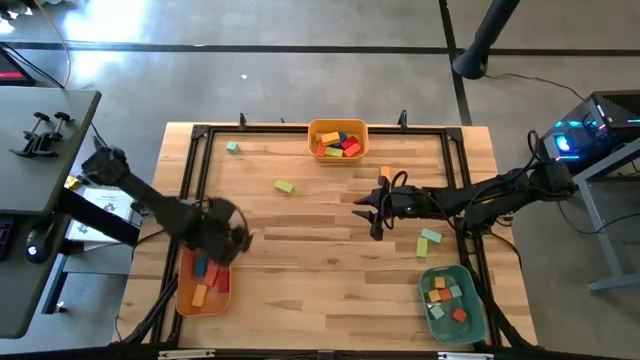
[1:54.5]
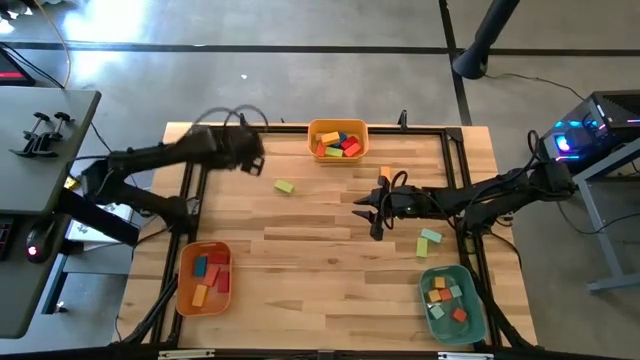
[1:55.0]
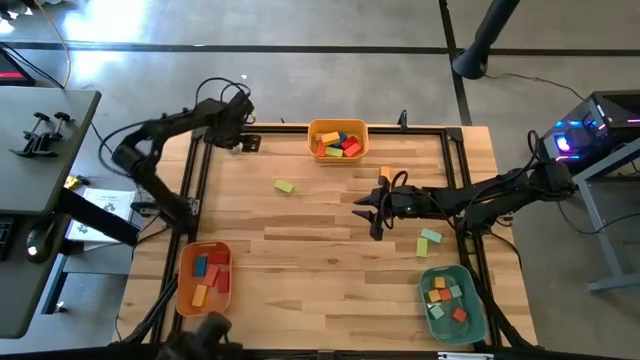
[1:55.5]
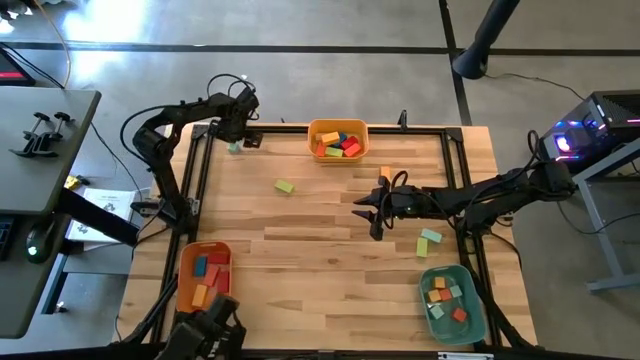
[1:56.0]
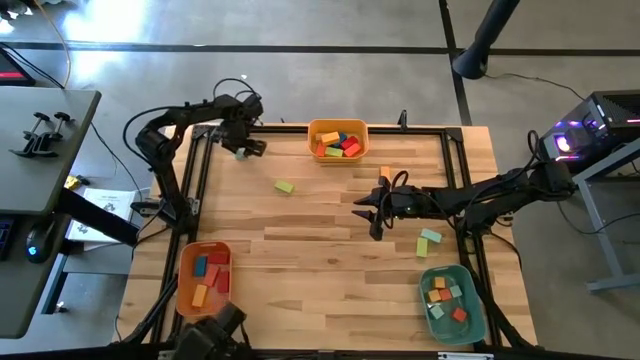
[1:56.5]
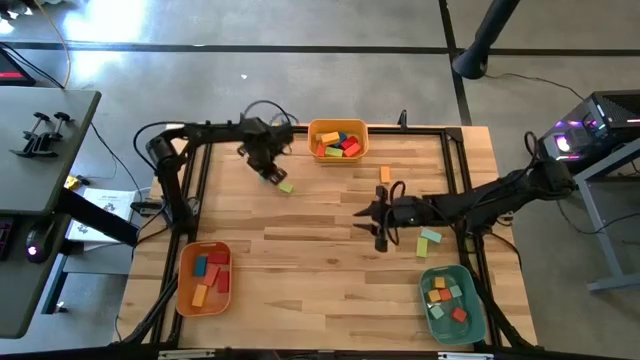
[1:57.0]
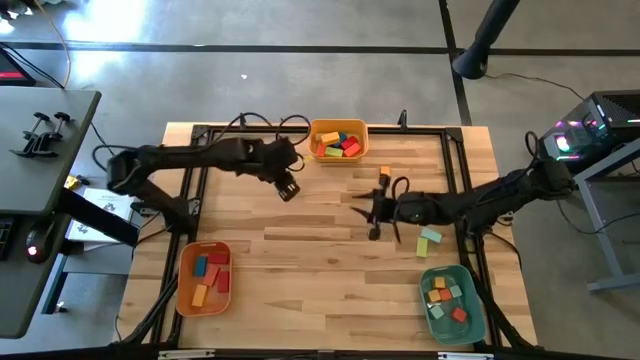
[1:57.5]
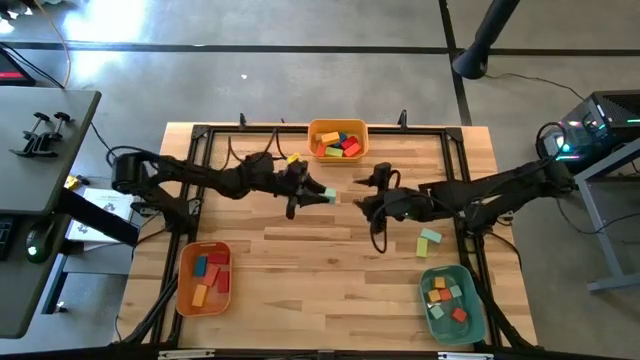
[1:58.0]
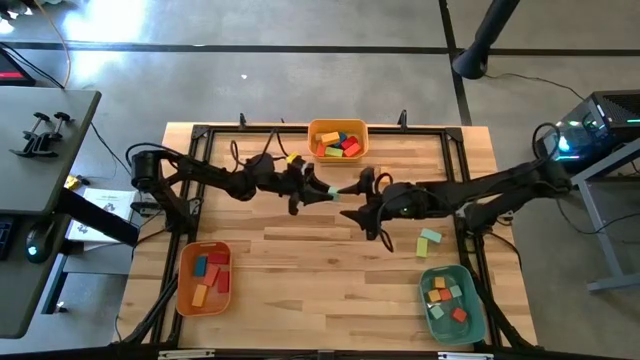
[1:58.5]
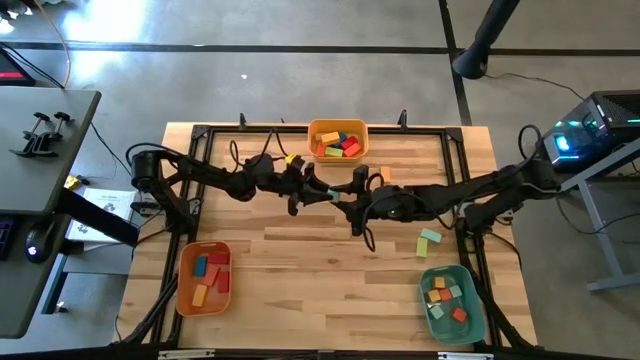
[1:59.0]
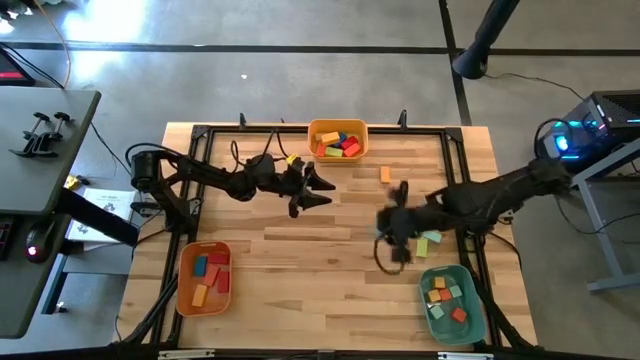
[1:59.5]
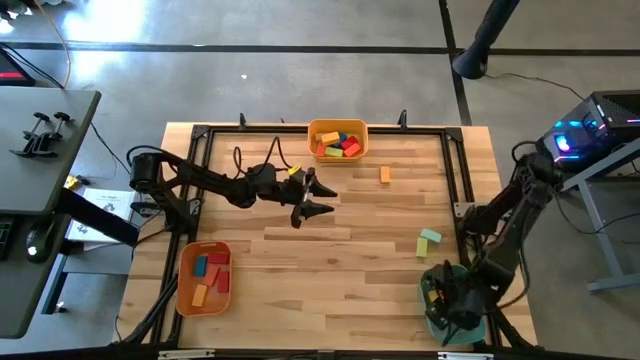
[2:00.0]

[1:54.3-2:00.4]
Task: Sort blocks by size
Put the blue square block into the blue bin

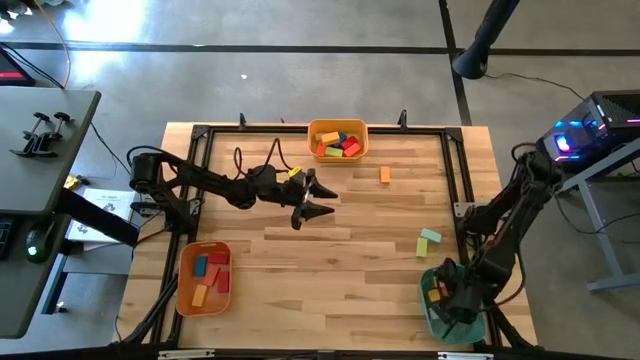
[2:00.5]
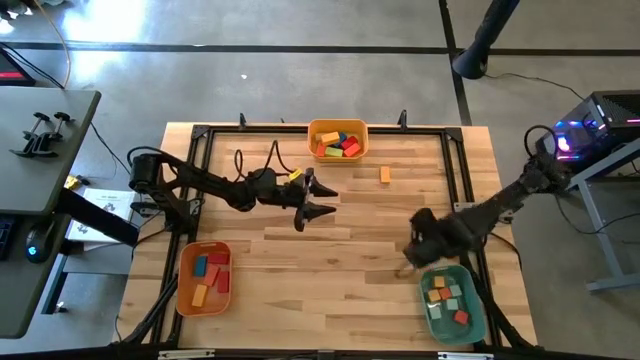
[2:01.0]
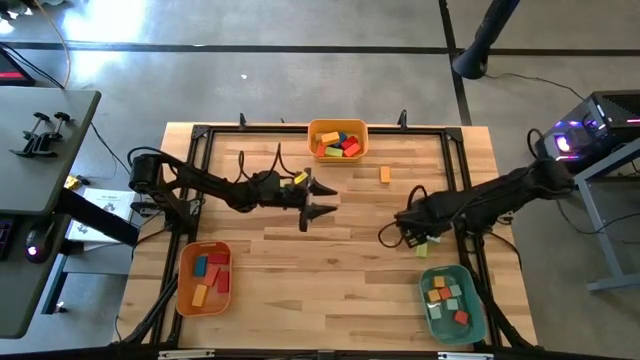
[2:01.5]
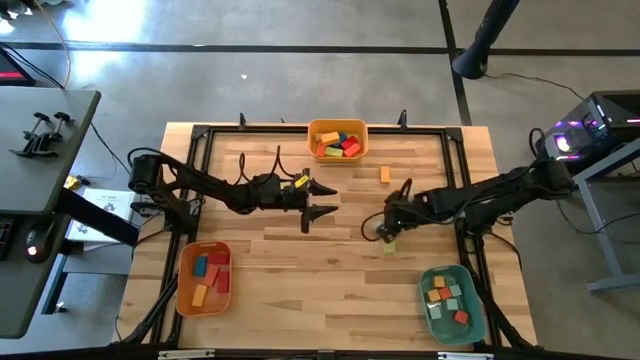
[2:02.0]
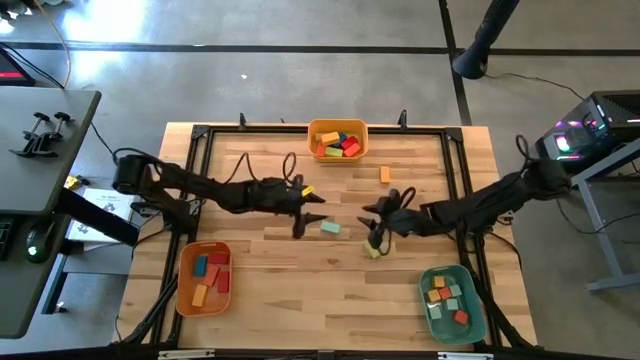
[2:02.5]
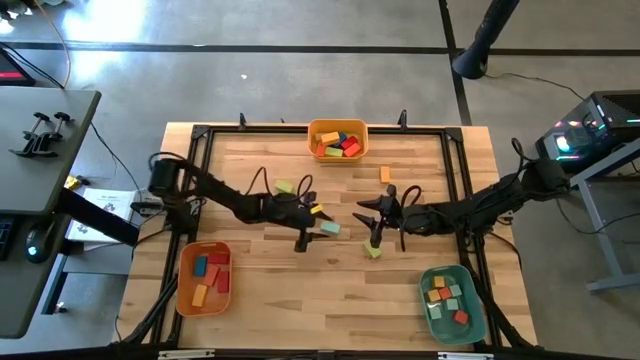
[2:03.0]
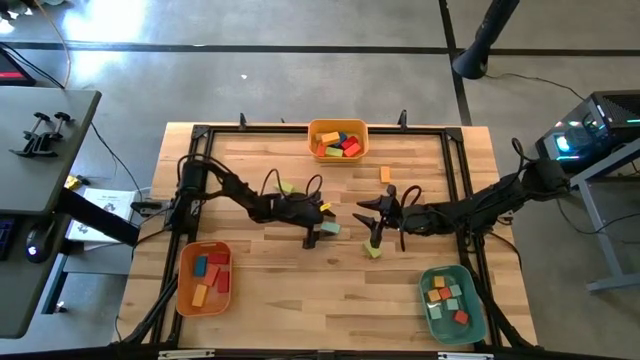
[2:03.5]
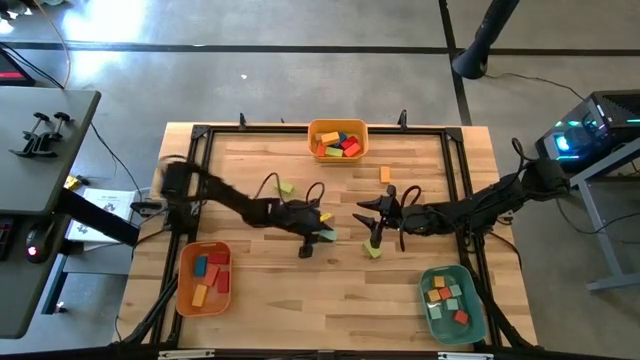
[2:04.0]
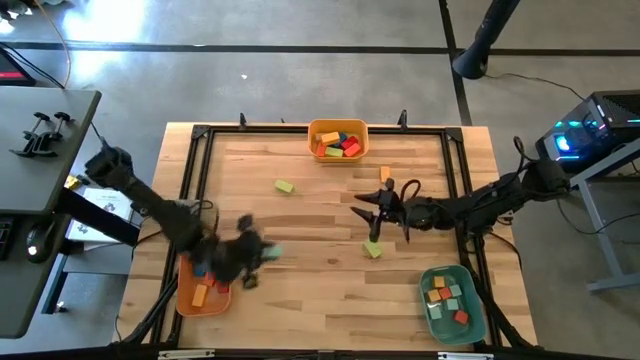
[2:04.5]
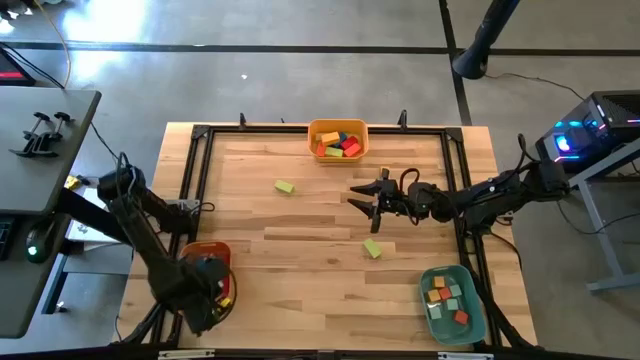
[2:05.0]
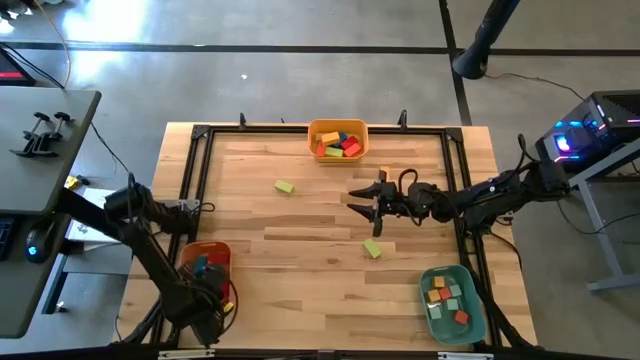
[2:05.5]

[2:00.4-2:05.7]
Put the blue narrow rectangular block into the orange bin

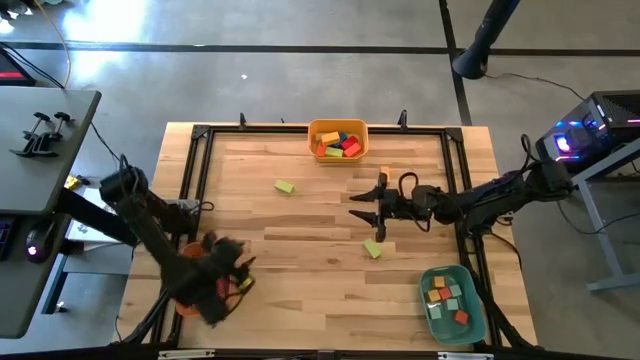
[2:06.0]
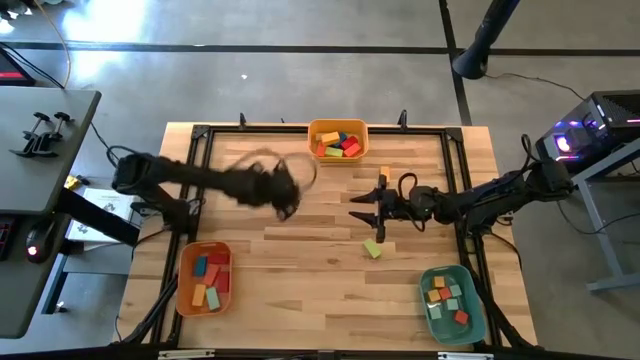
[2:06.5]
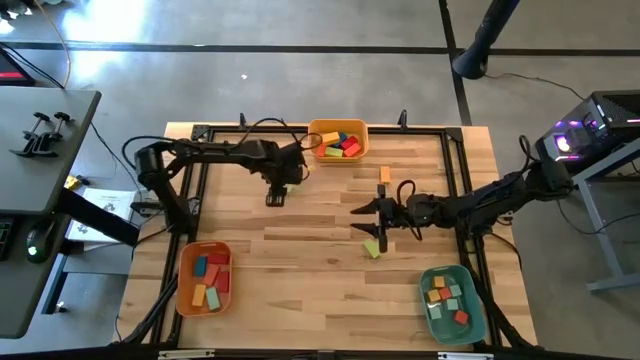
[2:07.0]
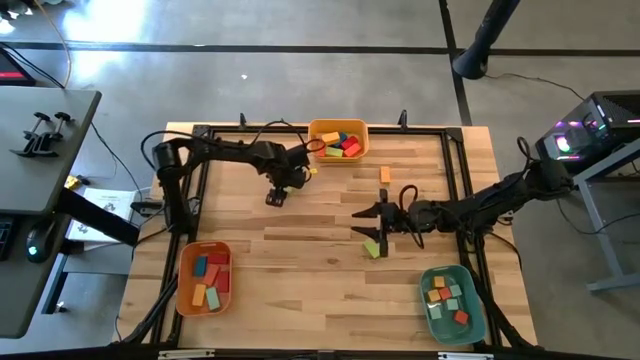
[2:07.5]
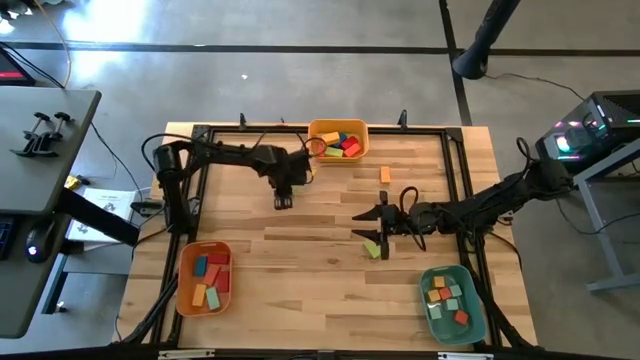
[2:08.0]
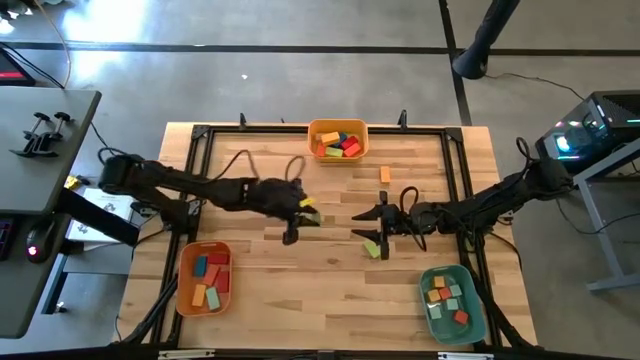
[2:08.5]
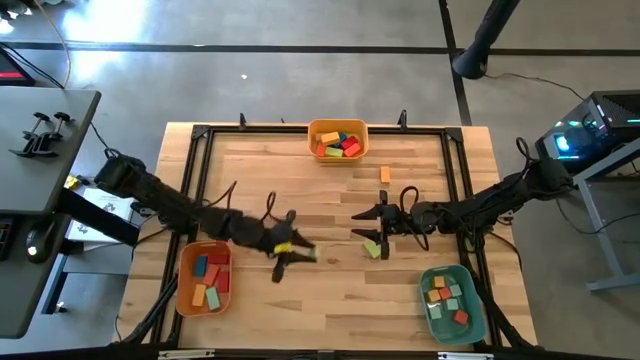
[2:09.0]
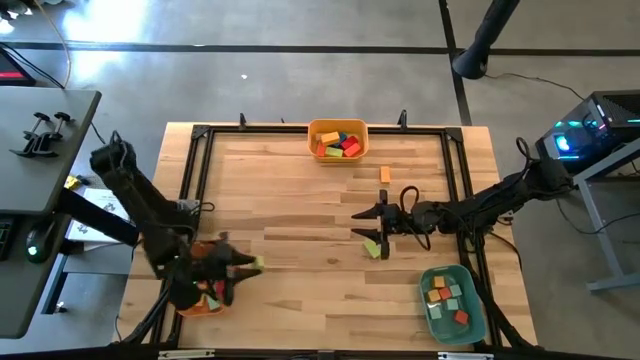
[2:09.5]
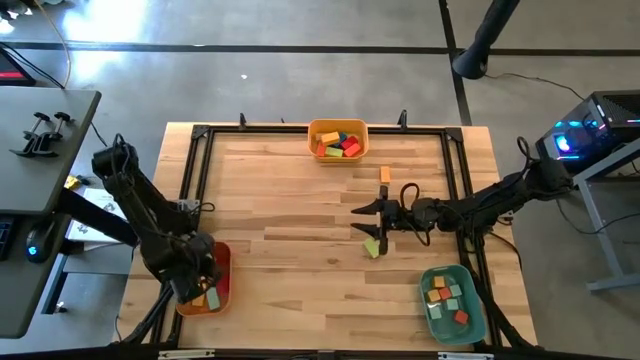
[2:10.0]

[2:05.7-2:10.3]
Put the top green narrow rectangular block into the orange bin

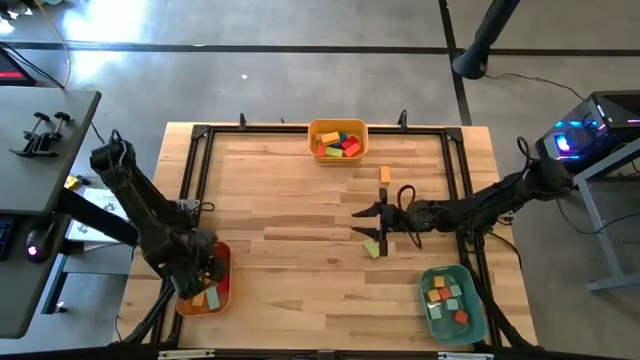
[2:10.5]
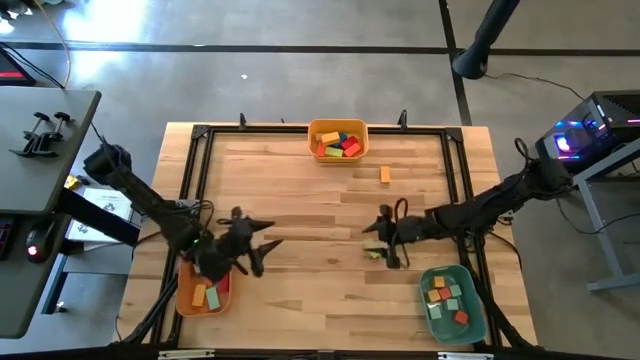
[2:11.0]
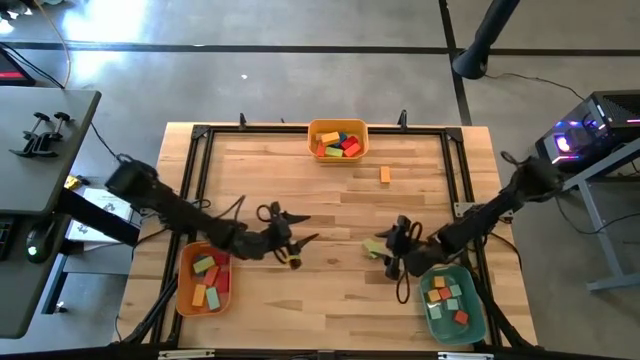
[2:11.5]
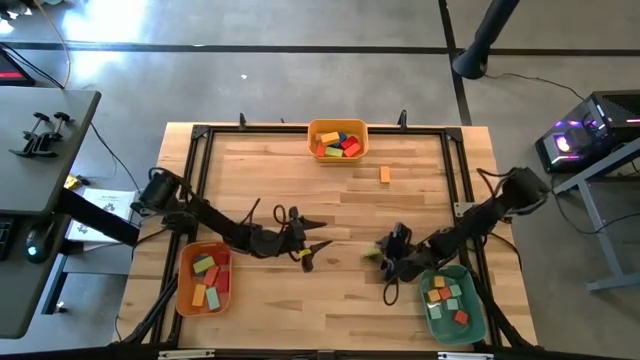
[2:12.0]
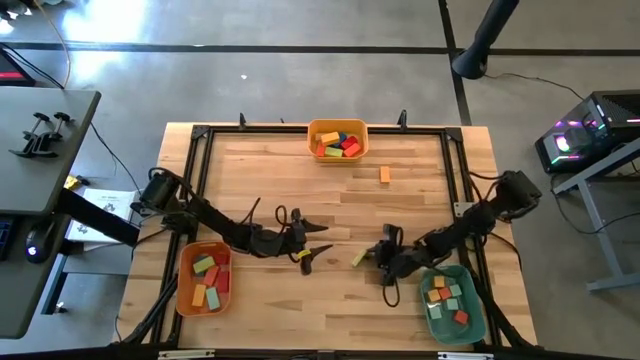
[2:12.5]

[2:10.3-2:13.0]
Put the green narrow rectangular block into the orange bin

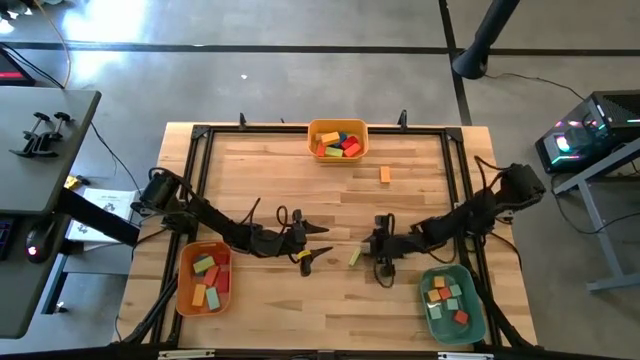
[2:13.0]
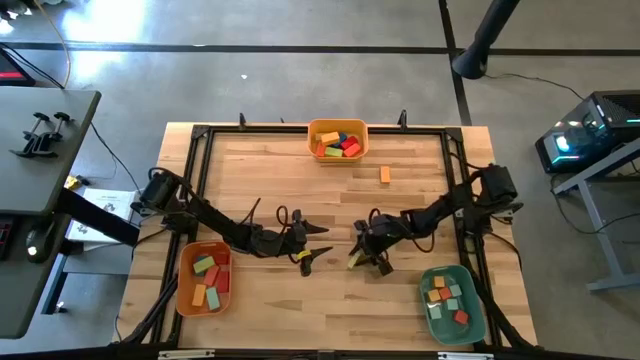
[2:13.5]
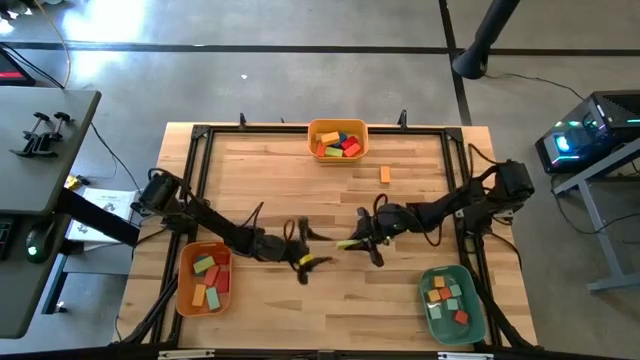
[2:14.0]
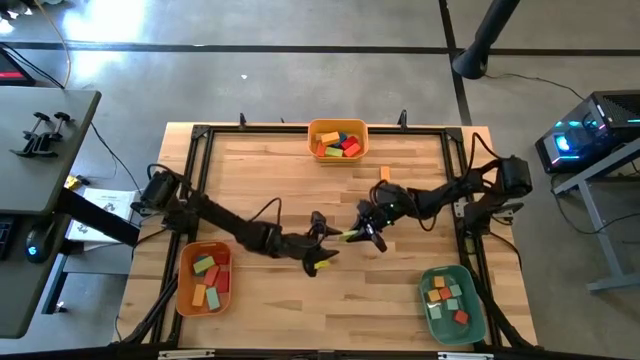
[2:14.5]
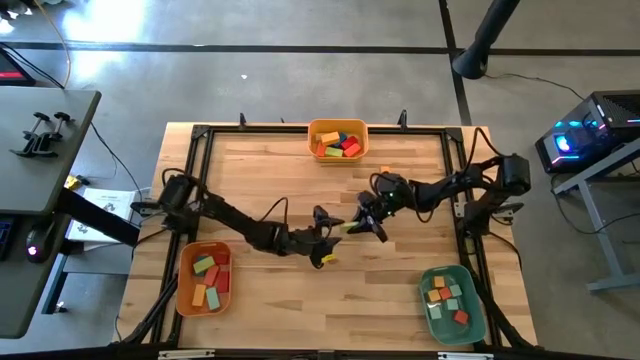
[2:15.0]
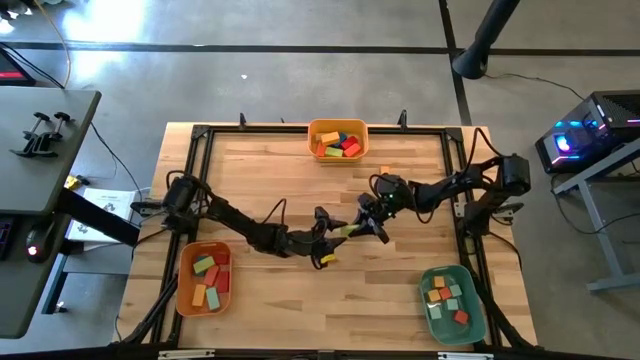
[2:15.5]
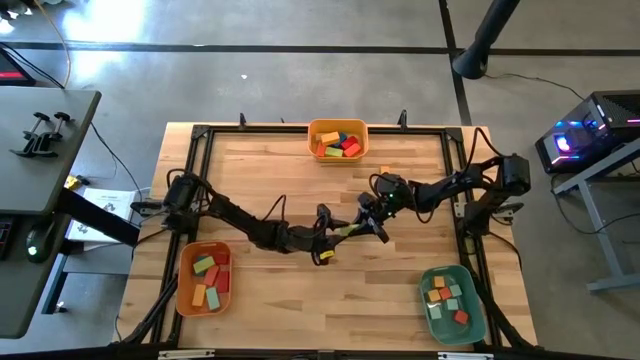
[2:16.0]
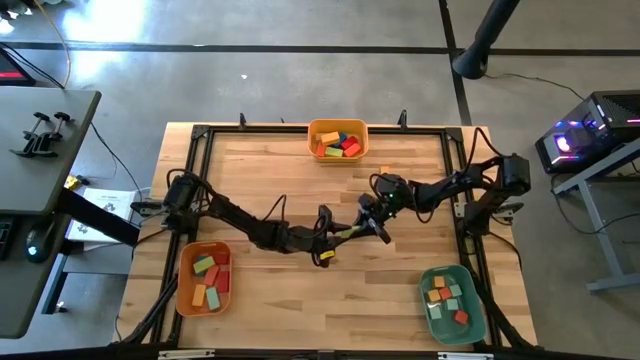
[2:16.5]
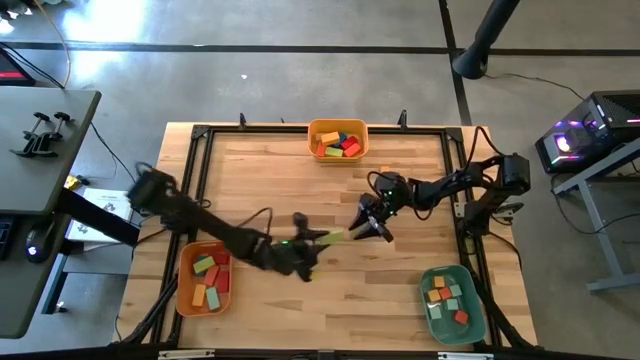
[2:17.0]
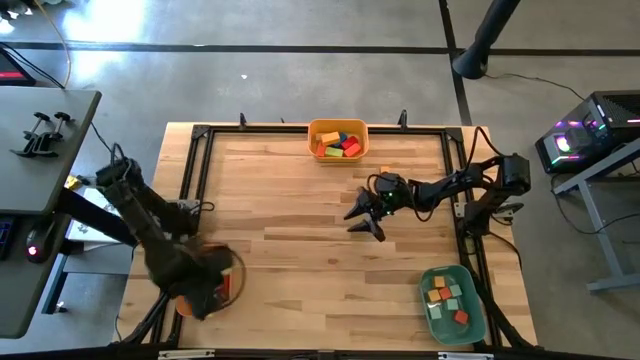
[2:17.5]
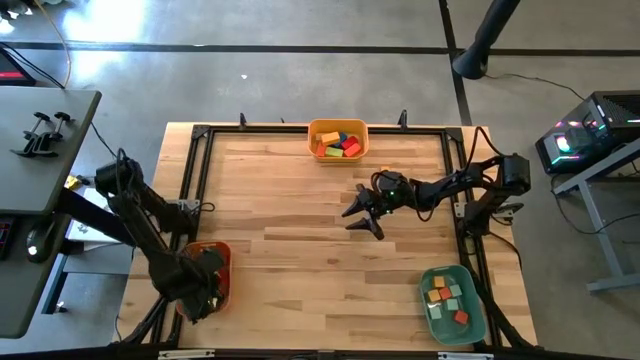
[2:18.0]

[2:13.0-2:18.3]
Put the green narrow rectangular block into the orange bin
